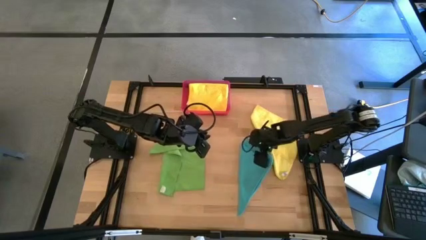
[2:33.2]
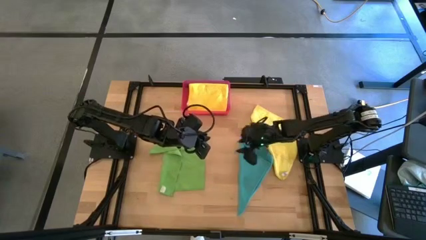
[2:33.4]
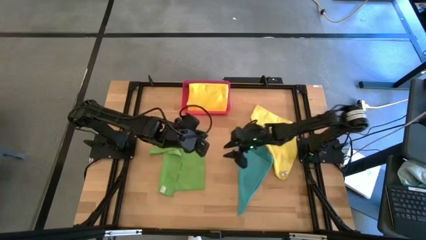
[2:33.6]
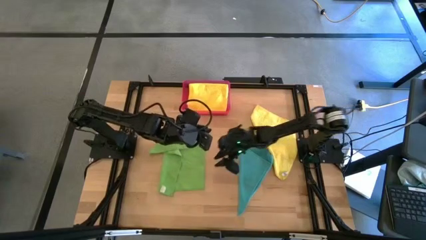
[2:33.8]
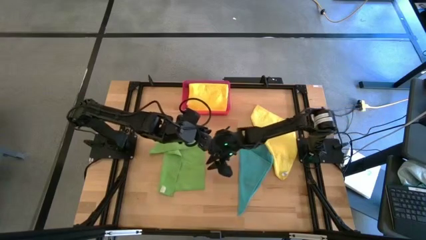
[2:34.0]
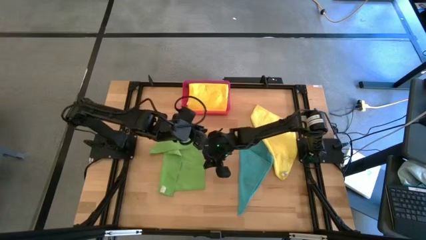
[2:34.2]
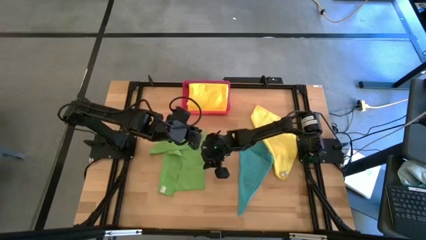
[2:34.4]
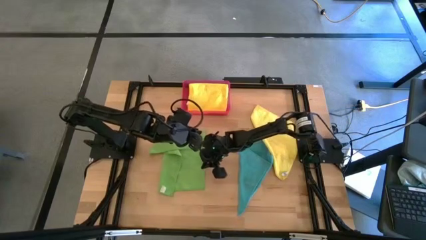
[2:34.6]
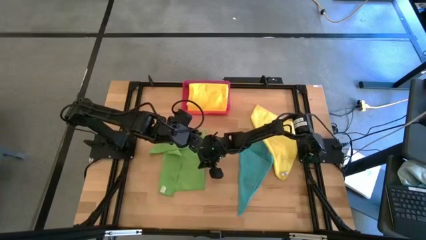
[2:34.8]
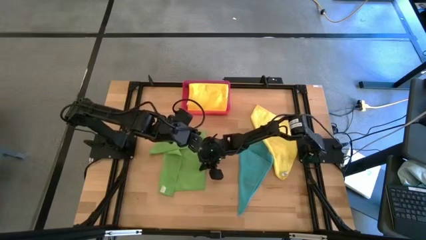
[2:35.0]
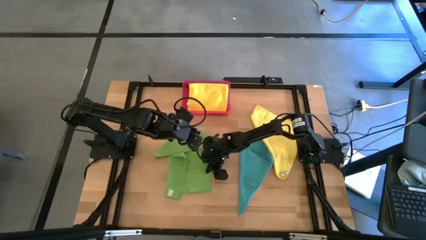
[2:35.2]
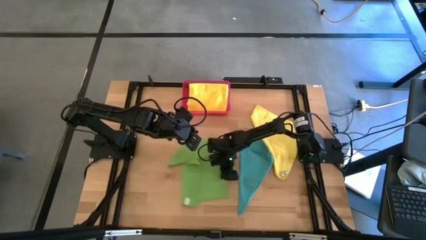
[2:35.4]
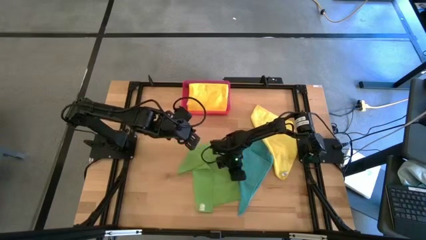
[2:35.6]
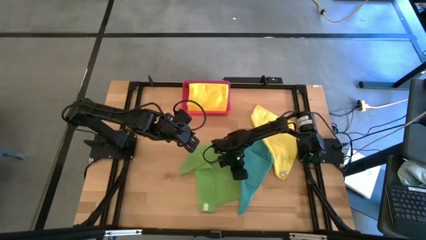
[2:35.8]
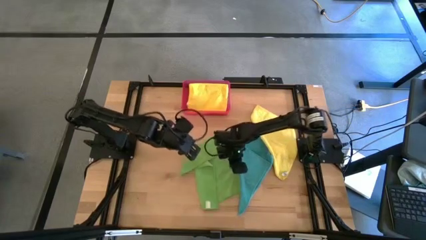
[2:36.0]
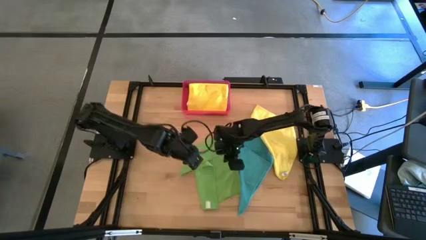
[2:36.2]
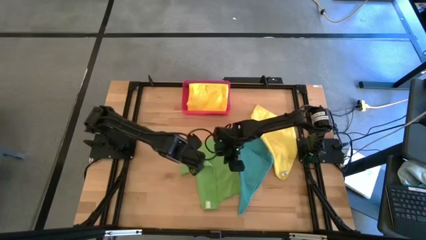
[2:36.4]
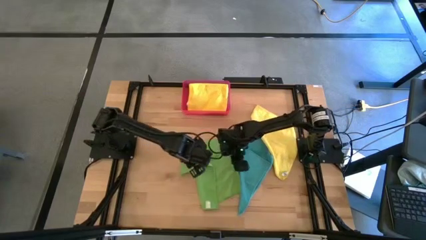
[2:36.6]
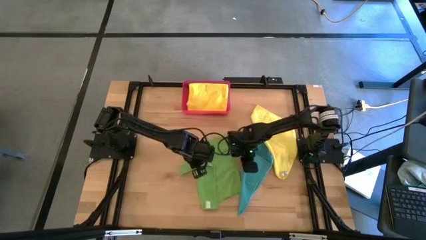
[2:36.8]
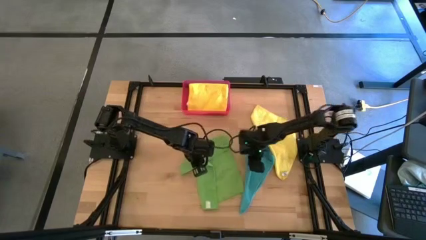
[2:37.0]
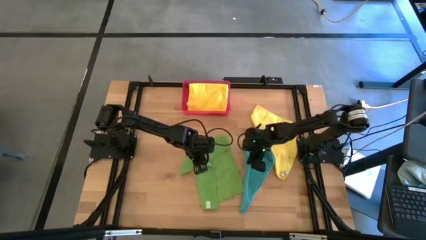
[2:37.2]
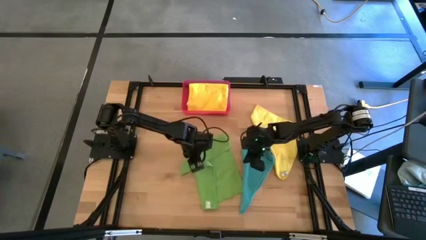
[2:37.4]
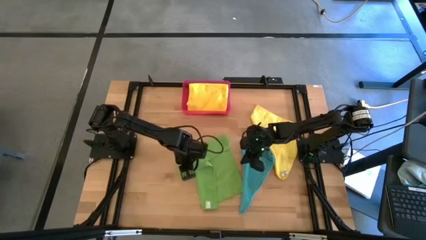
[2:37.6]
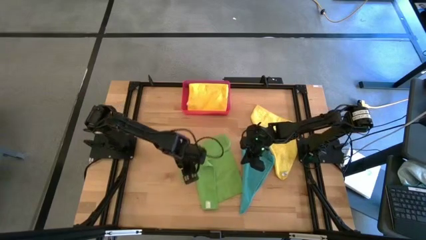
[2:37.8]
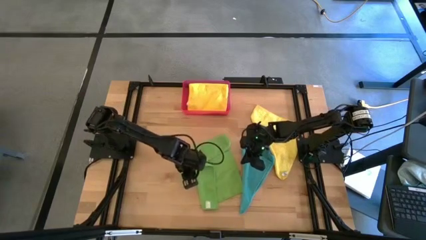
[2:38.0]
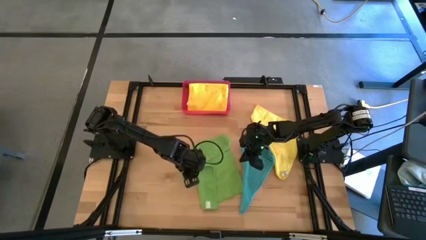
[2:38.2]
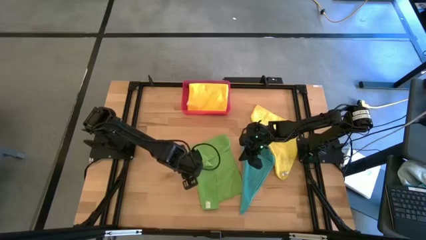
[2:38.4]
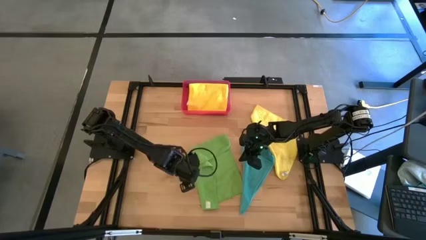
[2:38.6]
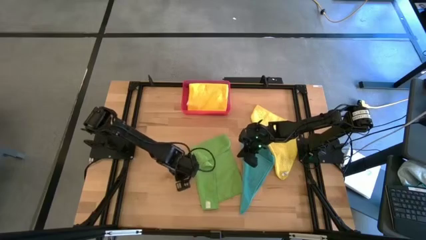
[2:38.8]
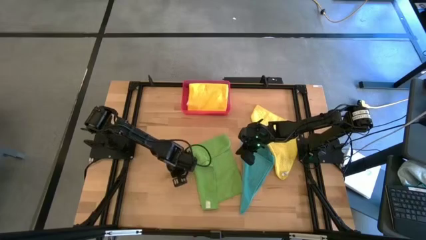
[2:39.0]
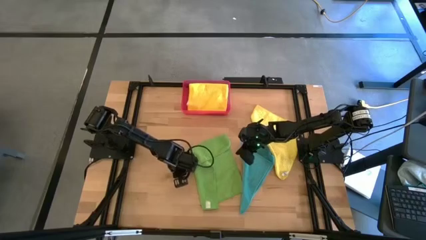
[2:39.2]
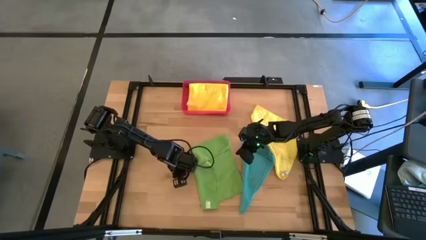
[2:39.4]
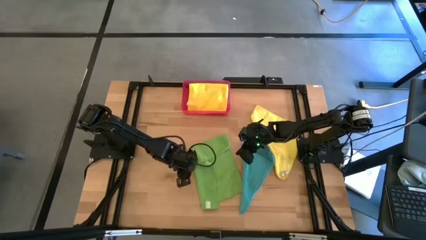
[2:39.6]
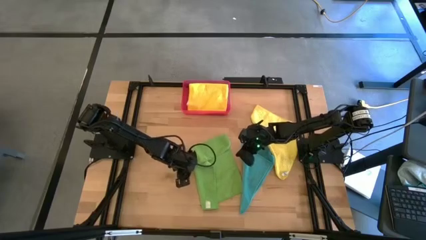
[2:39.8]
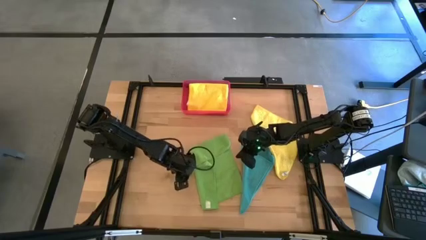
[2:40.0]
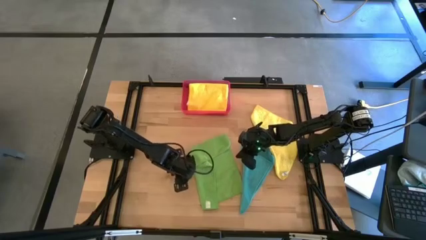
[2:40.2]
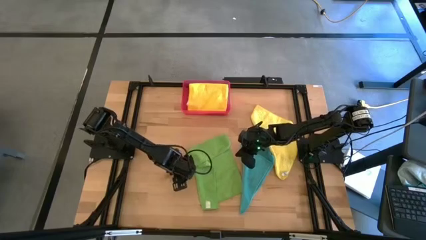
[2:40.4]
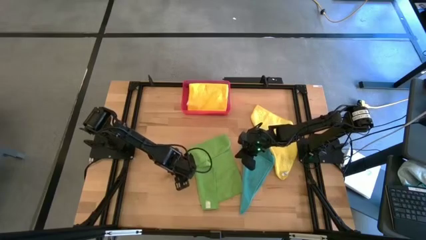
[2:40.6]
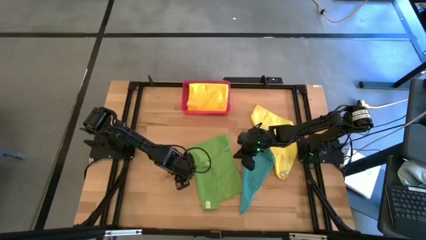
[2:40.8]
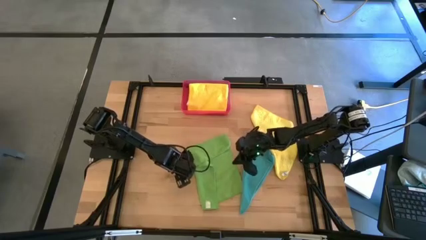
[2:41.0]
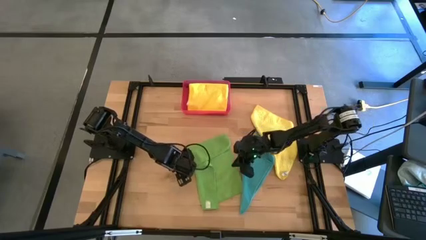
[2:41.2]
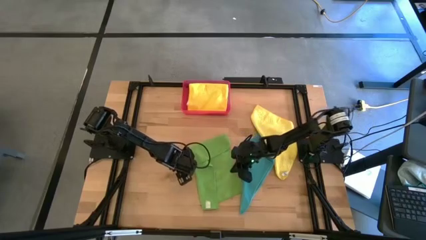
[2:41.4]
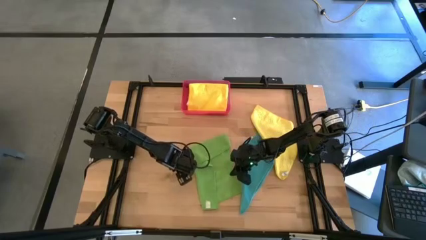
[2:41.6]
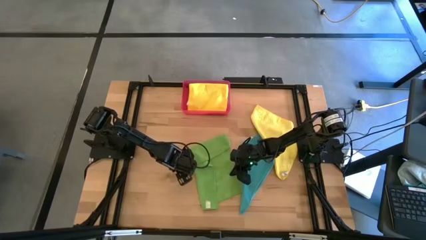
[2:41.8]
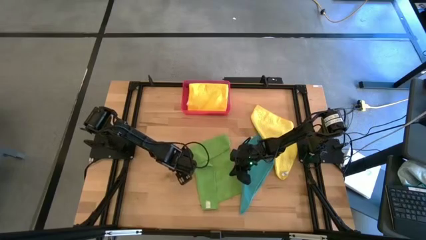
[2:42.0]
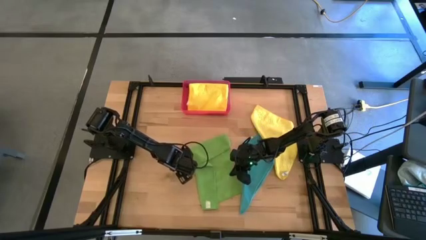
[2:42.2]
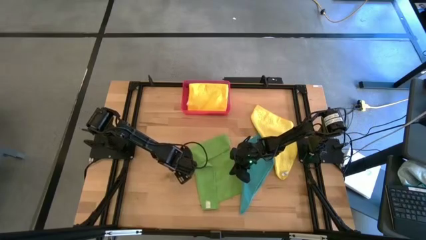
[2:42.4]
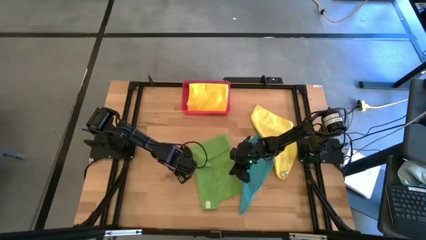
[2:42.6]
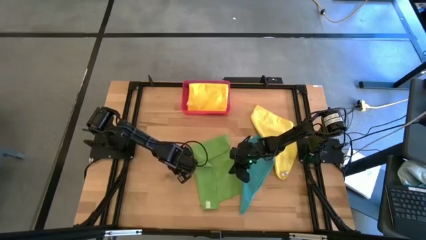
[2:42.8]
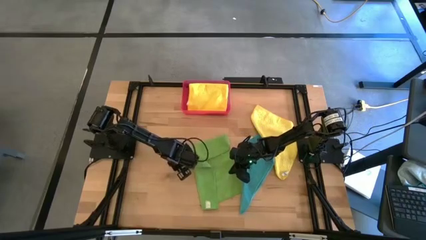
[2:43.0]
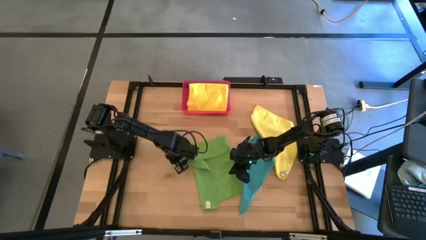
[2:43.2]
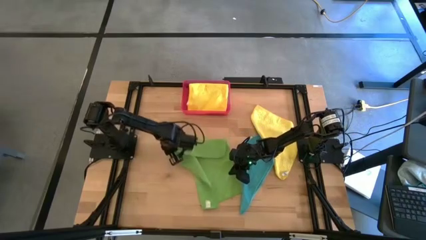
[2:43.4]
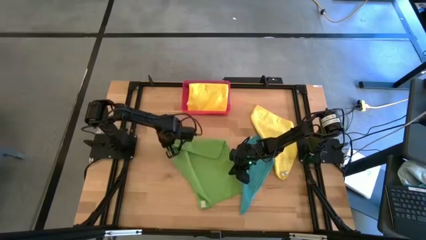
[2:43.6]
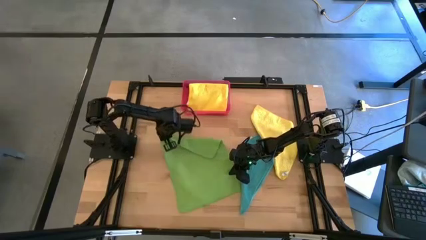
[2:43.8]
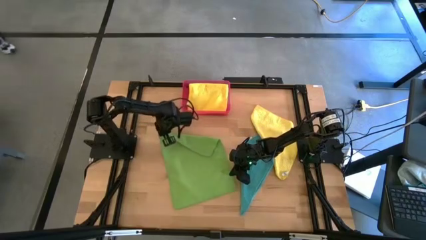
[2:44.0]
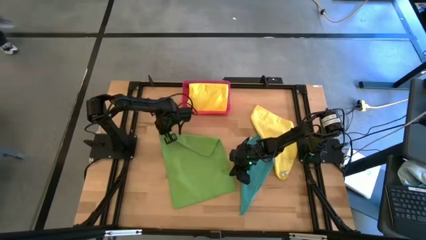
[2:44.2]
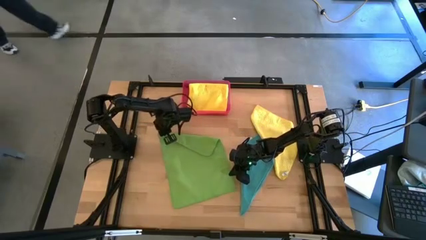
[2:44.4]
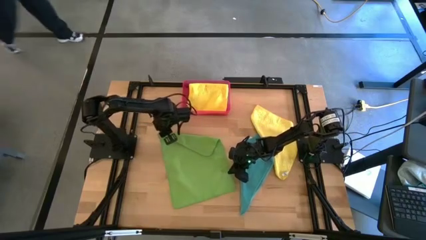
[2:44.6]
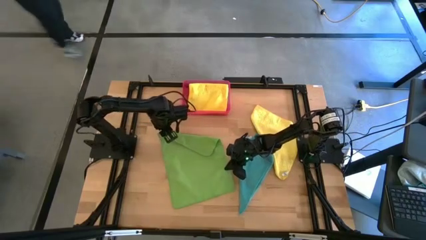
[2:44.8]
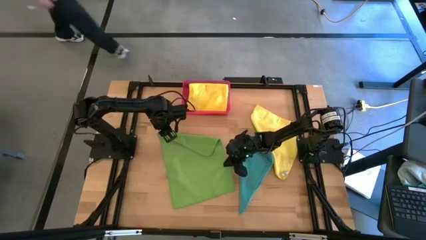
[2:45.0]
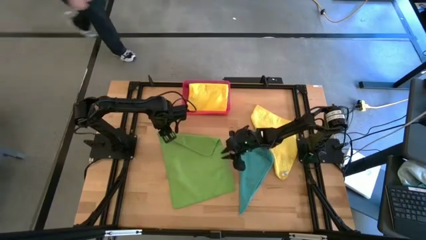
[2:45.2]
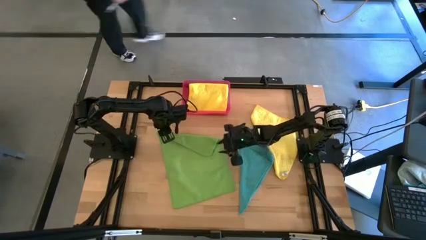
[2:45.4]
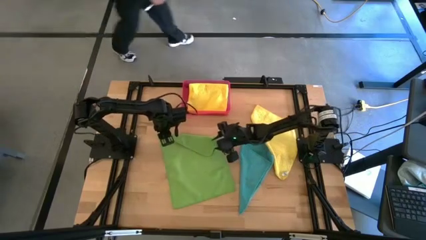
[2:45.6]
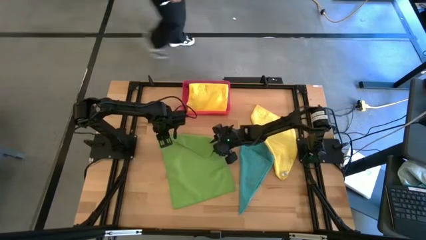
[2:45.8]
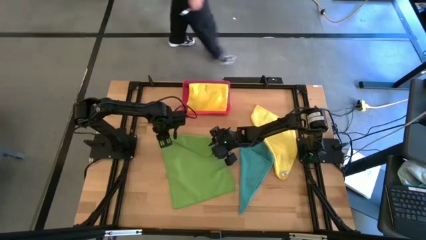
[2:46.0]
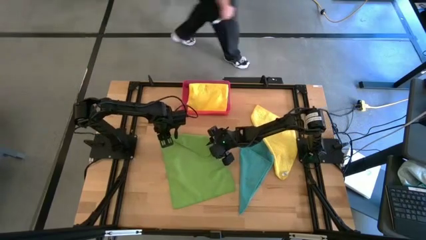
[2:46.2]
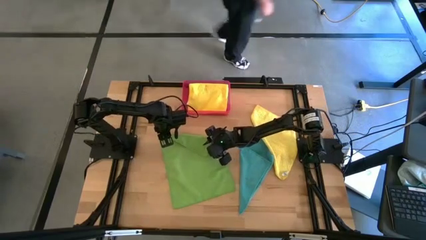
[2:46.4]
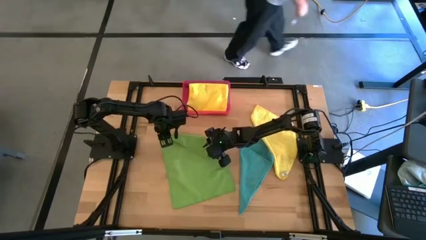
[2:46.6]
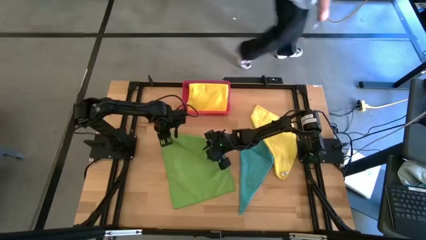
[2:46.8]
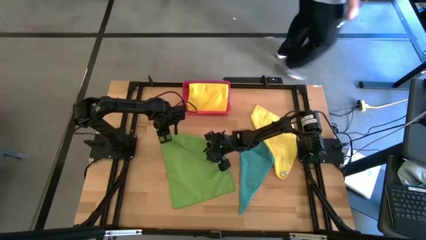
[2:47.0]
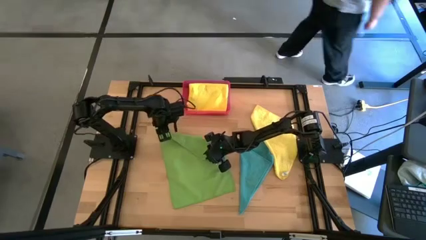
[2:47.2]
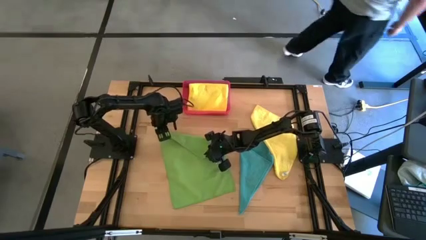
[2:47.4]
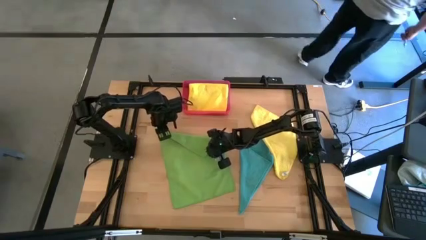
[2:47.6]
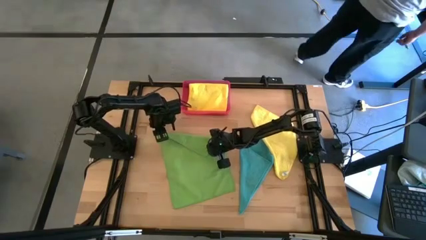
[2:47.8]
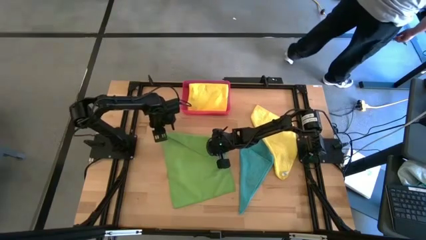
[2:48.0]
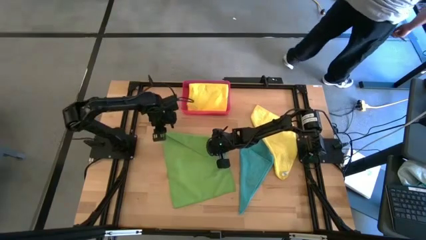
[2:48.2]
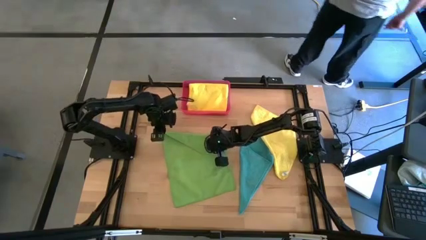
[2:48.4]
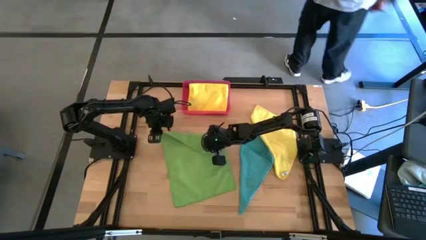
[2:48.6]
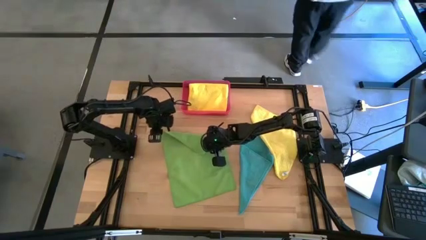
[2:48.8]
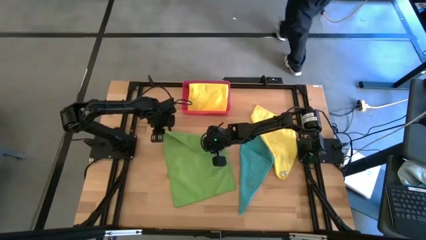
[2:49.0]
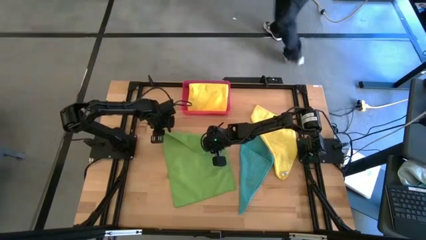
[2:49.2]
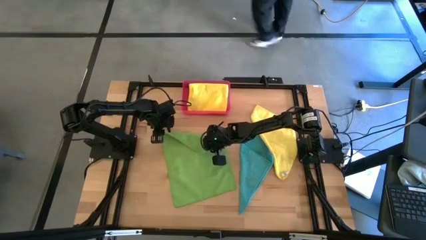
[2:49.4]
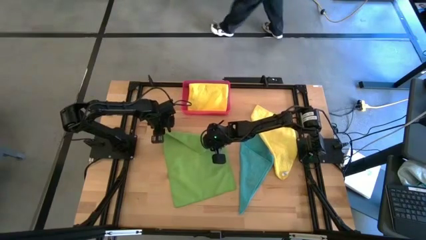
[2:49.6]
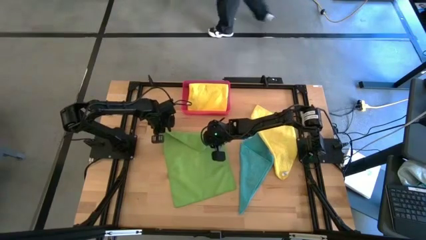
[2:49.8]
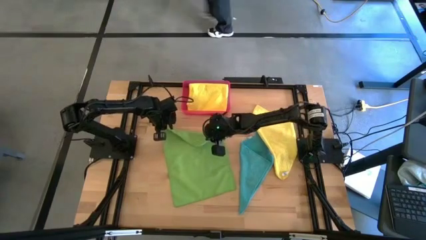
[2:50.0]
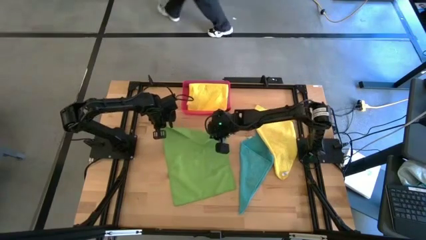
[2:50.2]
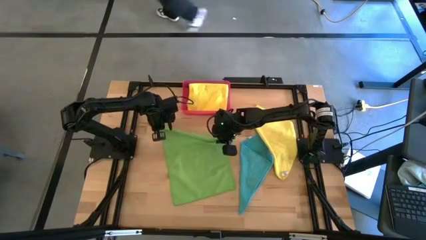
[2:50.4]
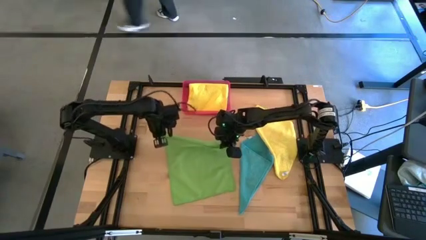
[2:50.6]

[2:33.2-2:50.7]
Task: Fold microfiber towels
Fold the green microfiber cloth
